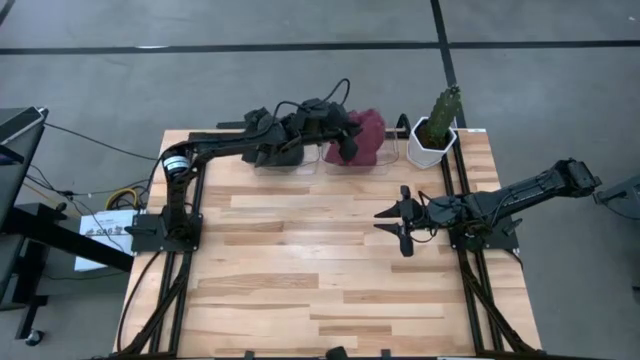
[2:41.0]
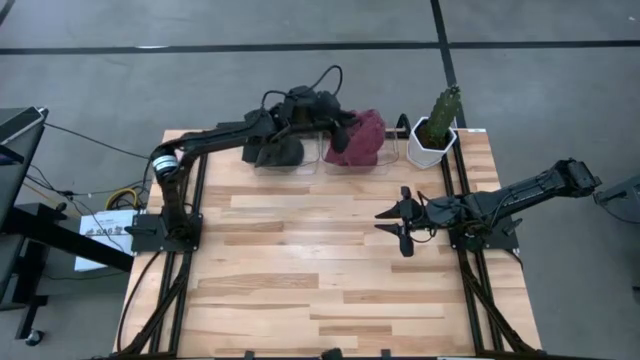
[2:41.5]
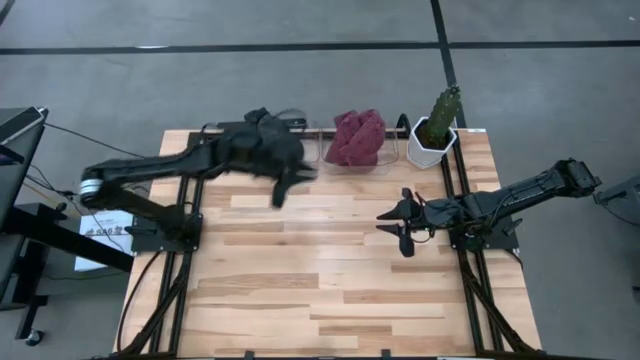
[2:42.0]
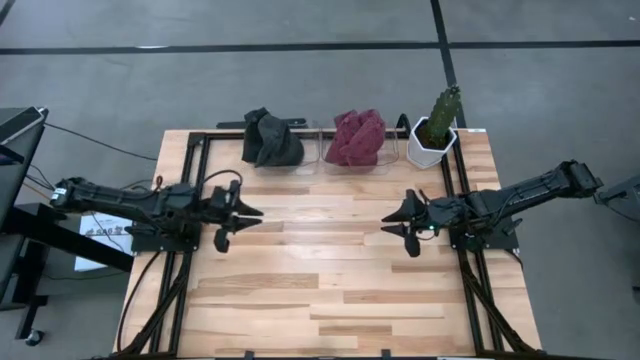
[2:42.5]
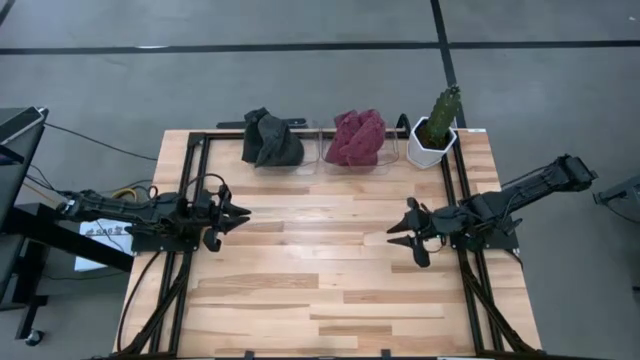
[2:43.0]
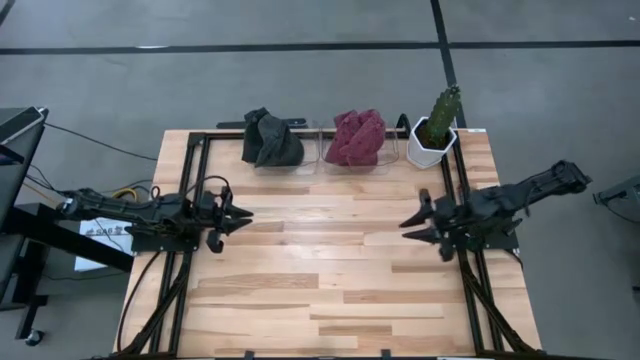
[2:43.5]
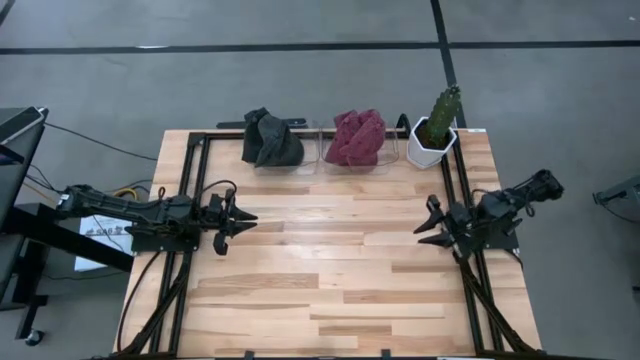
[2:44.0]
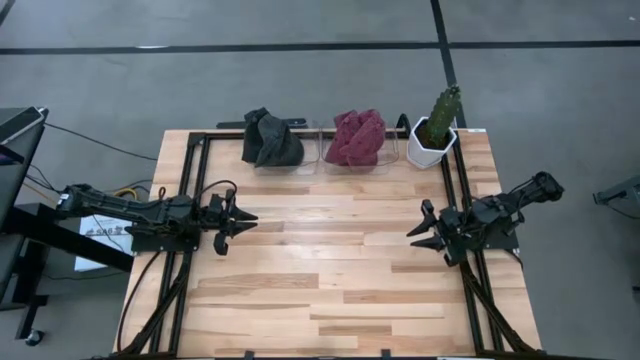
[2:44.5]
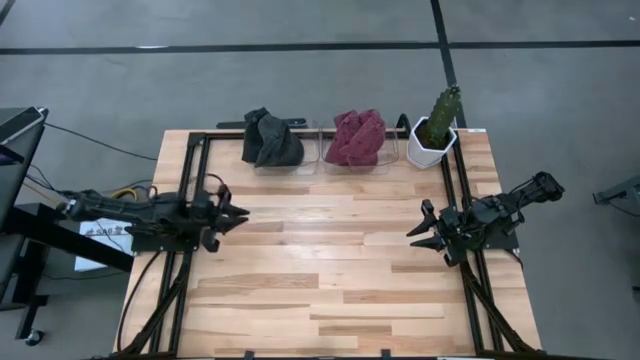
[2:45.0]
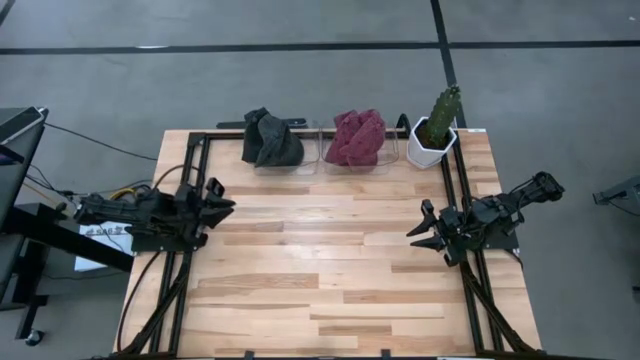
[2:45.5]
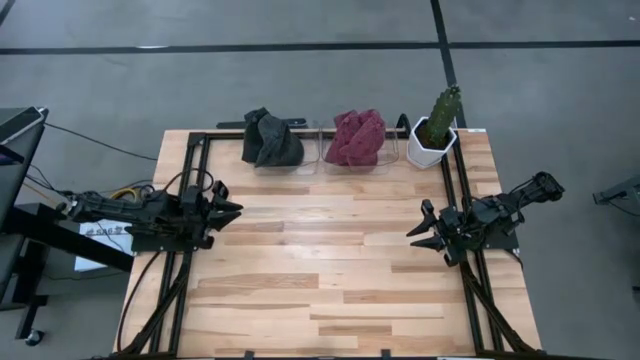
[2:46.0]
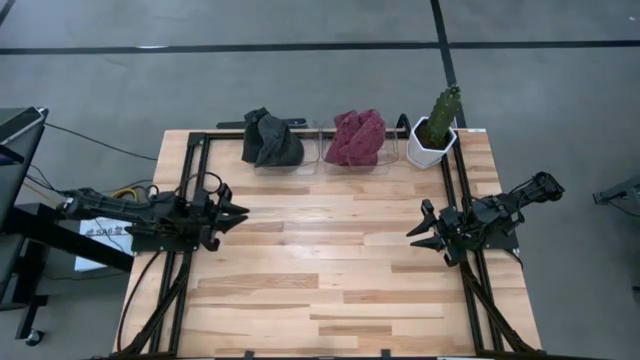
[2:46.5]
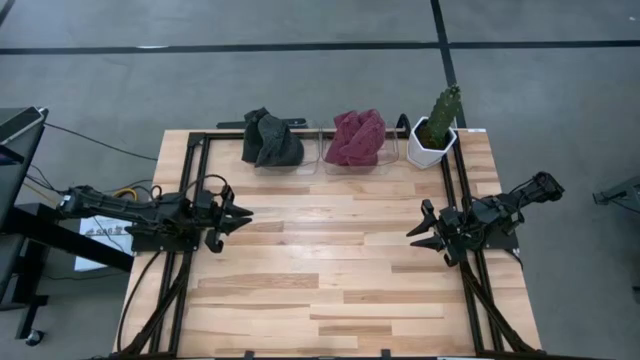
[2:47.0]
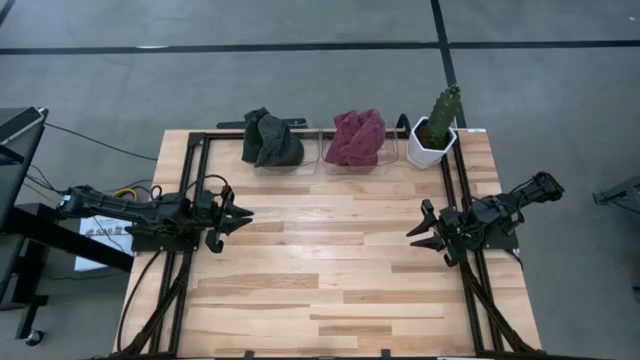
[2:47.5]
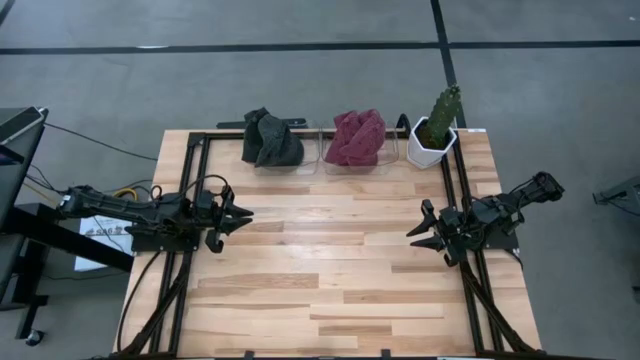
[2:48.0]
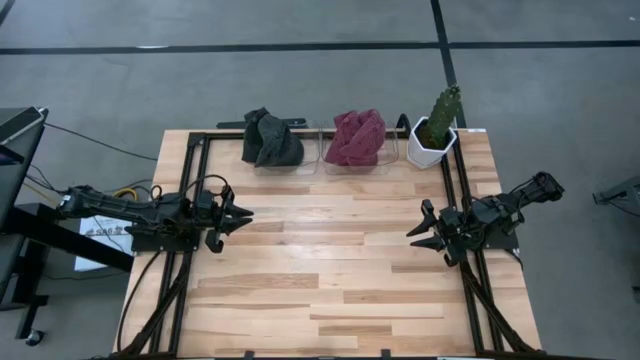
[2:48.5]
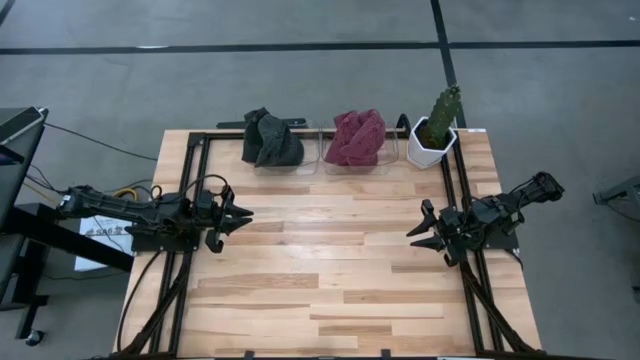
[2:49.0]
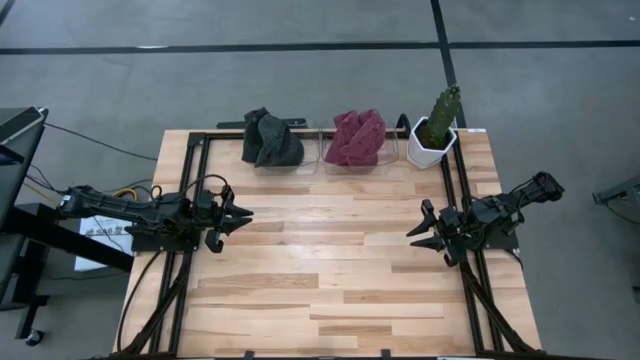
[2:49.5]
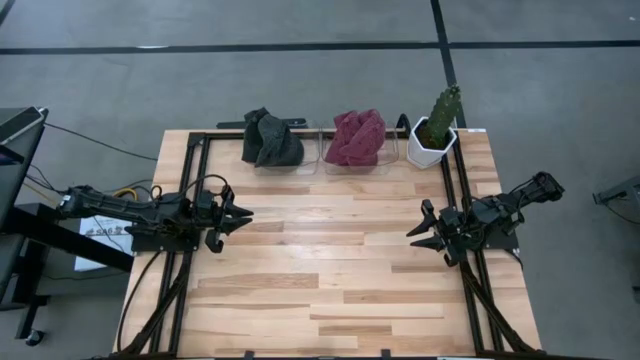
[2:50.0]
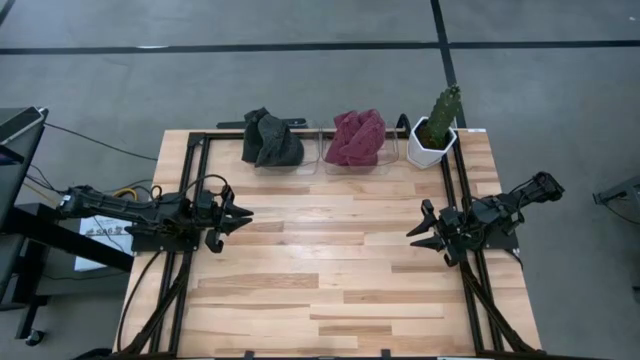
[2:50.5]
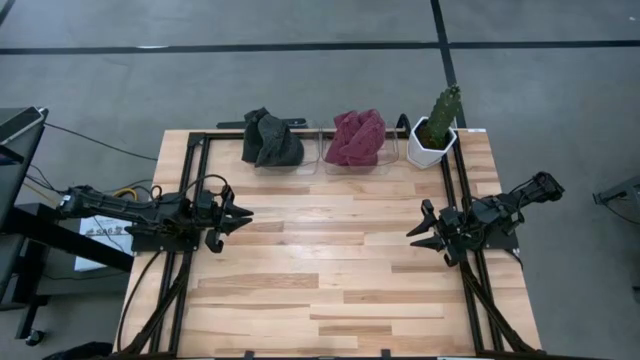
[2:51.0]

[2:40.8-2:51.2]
Task: Pick & Place hat
Return to Home Position

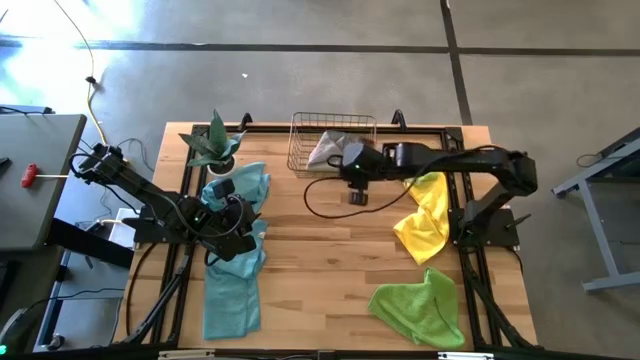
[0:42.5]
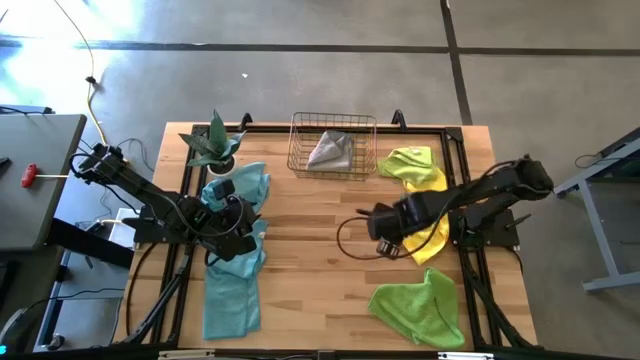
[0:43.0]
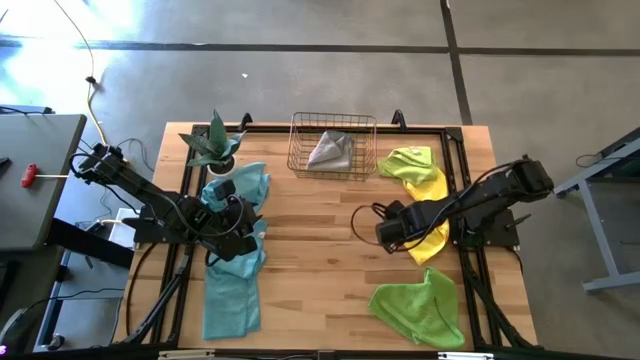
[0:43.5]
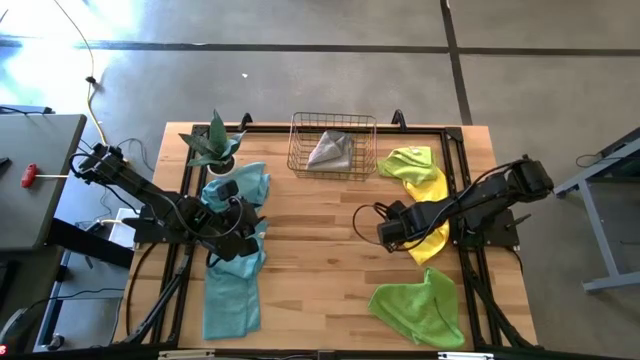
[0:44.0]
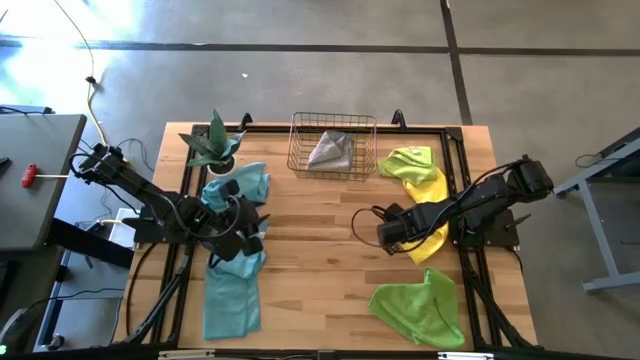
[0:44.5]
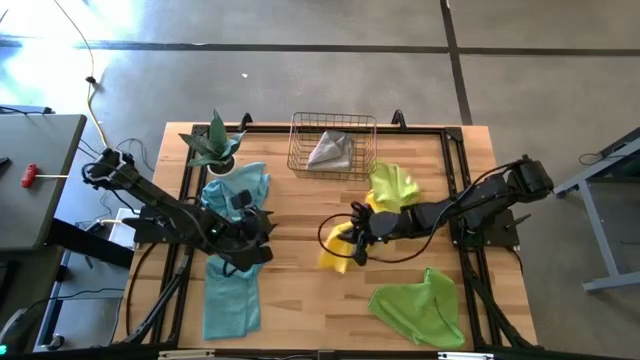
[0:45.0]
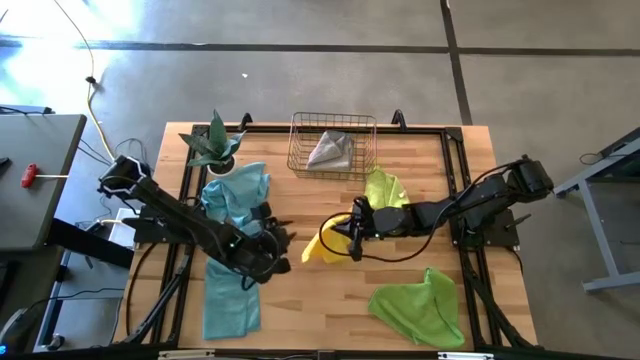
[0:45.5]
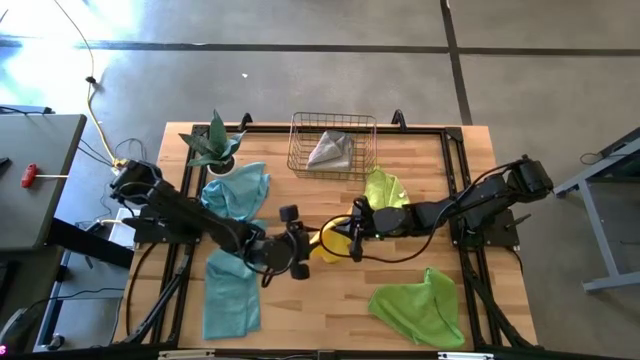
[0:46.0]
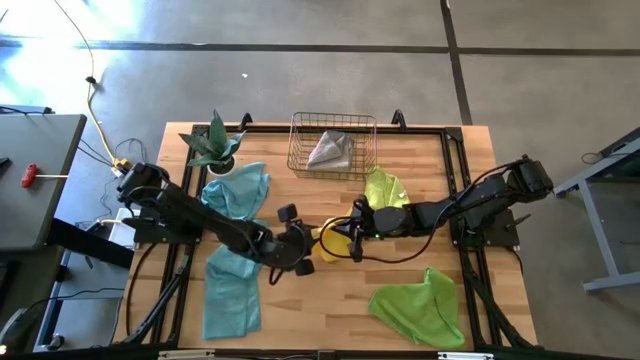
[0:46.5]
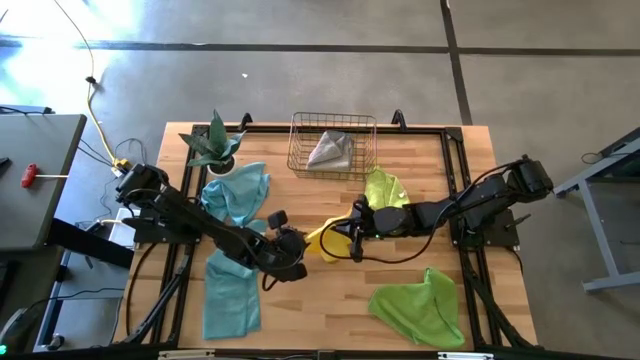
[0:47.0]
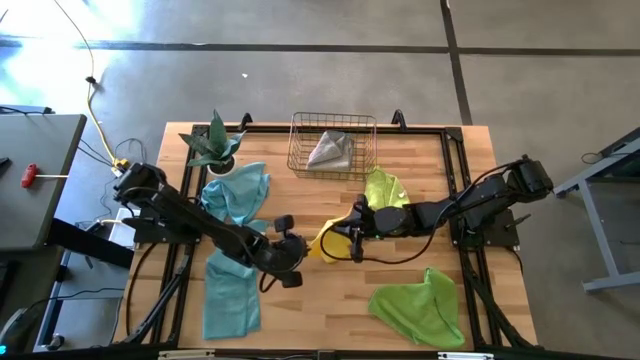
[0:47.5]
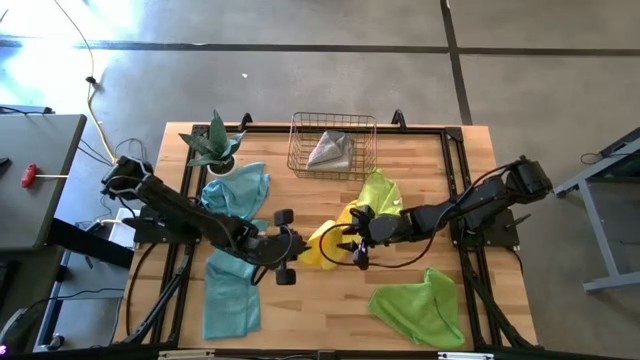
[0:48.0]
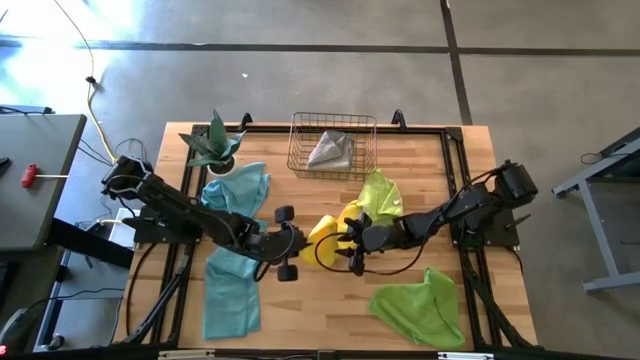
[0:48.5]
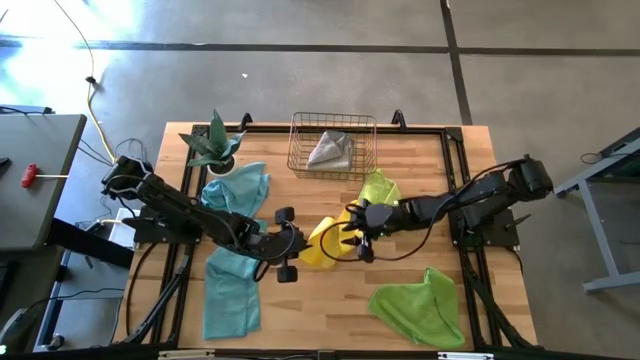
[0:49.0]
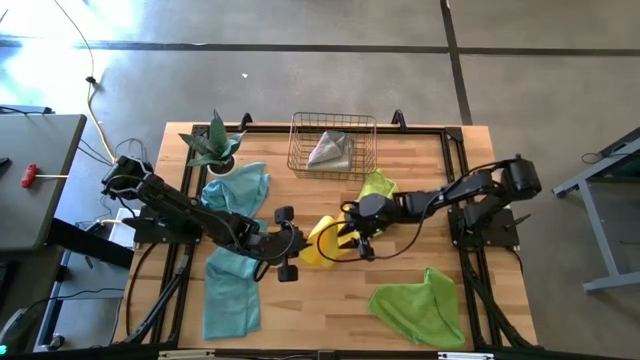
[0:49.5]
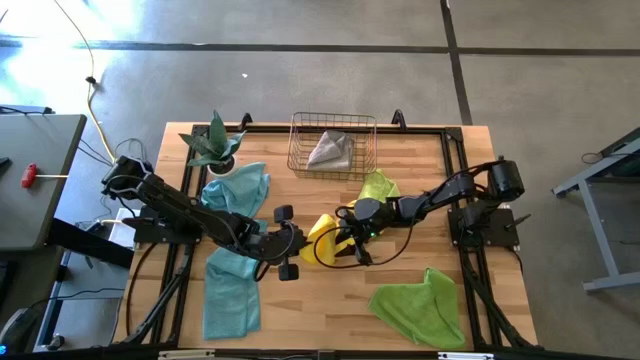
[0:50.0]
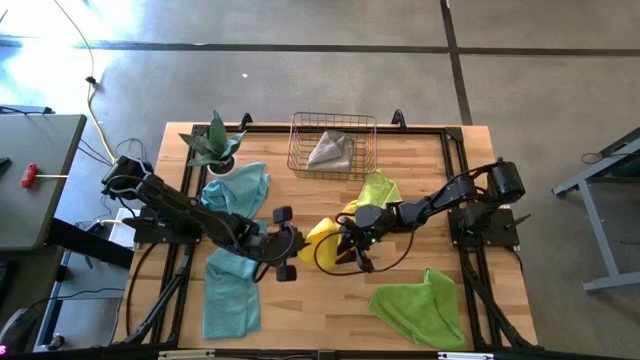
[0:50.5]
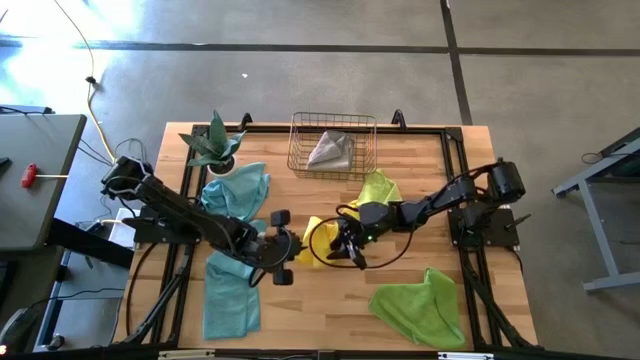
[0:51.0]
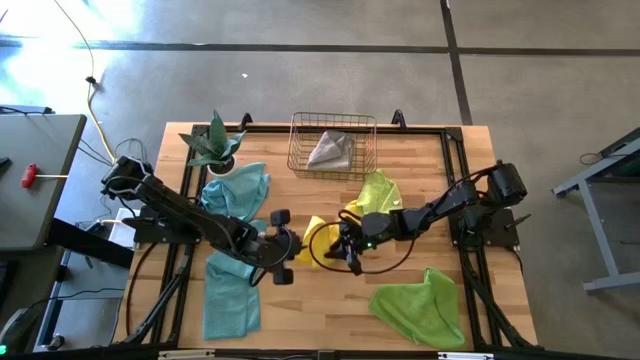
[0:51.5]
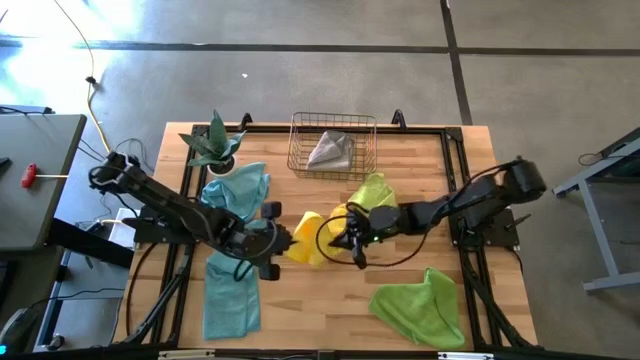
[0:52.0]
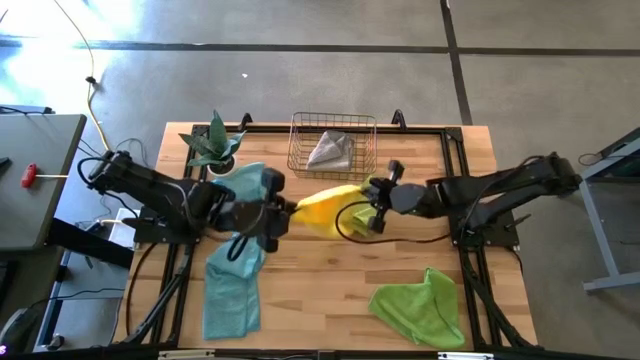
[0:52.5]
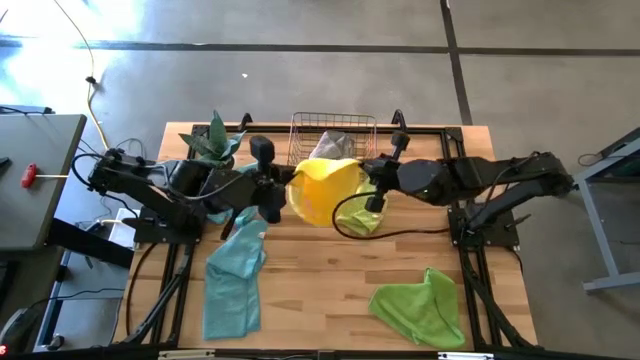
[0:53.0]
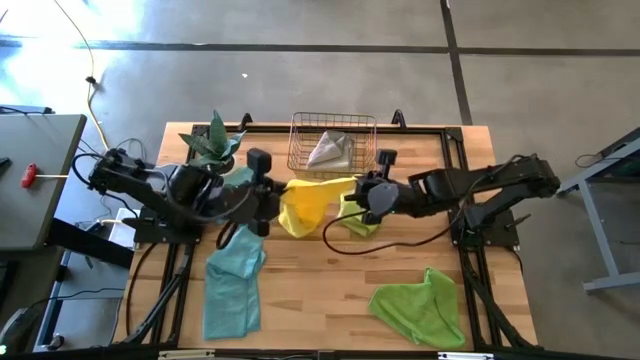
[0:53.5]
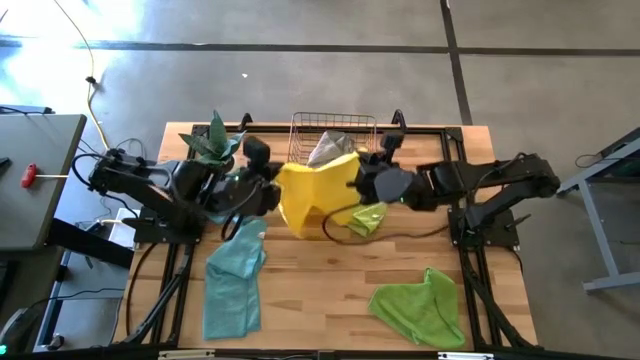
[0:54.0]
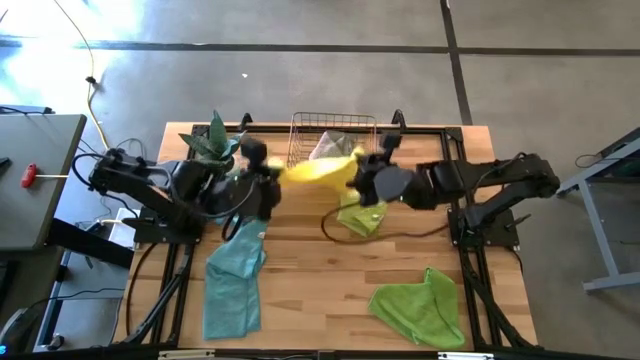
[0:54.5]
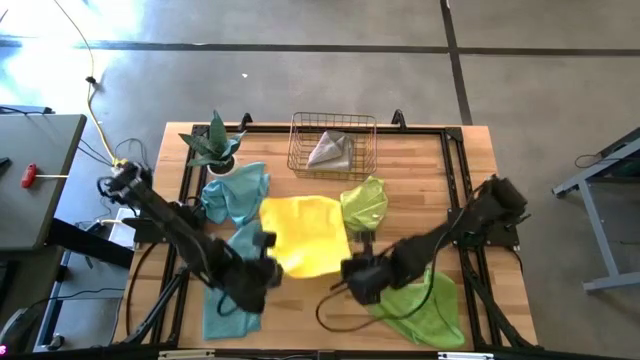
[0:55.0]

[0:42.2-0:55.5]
Task: Fold microfiber towels
Fold the yellow microfiber towel
